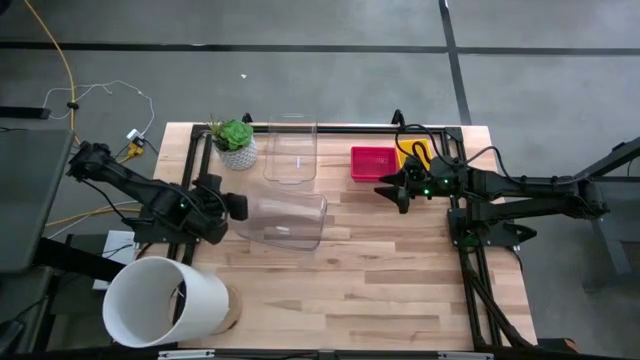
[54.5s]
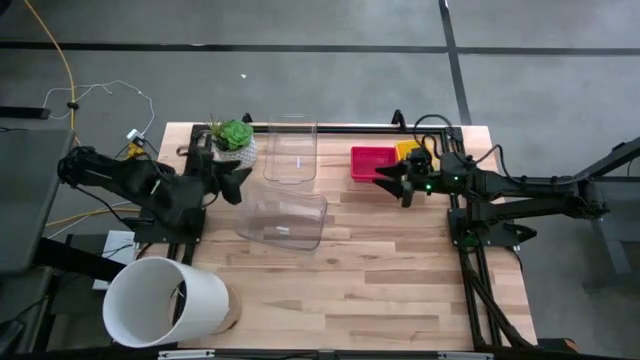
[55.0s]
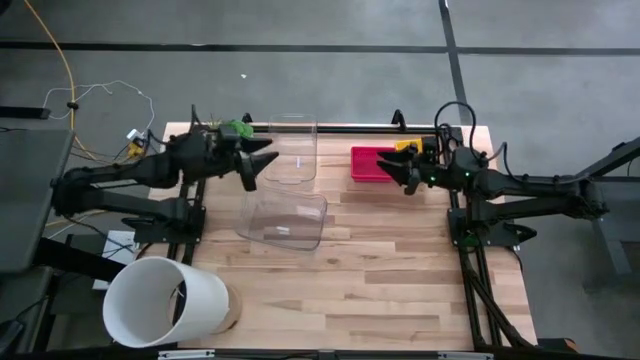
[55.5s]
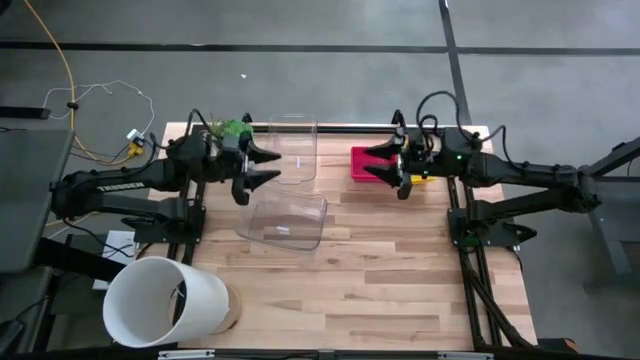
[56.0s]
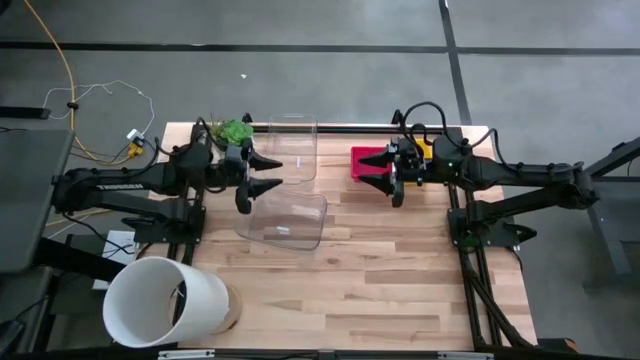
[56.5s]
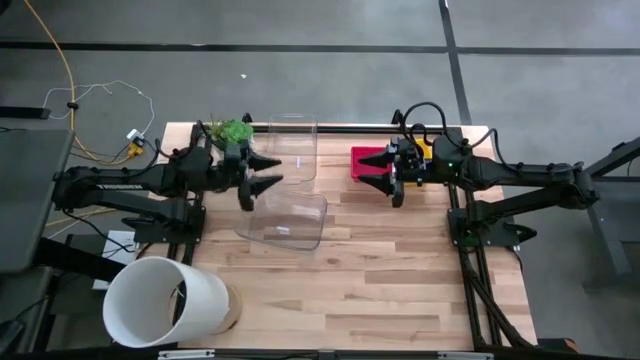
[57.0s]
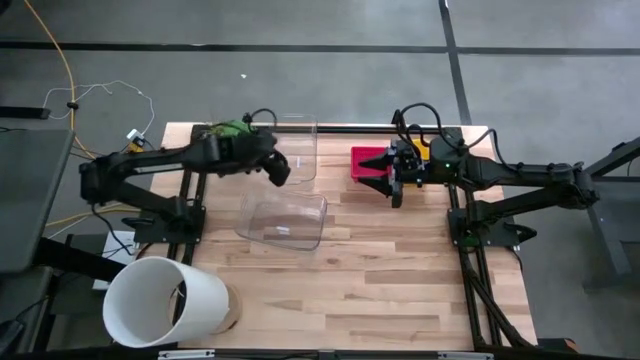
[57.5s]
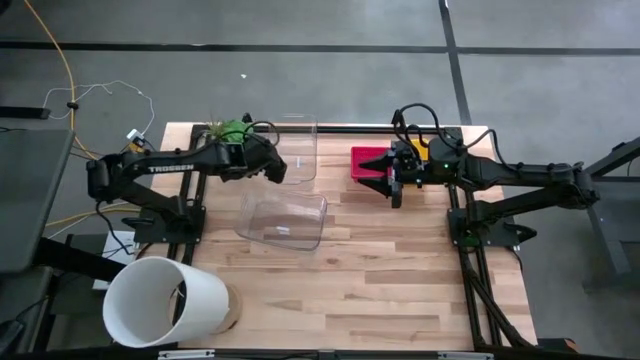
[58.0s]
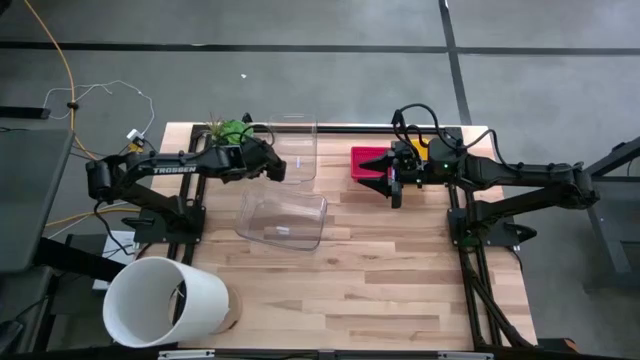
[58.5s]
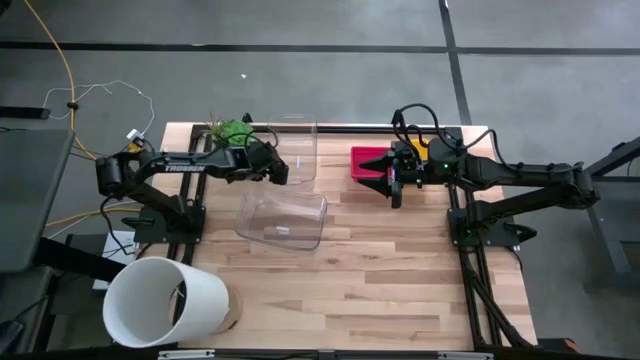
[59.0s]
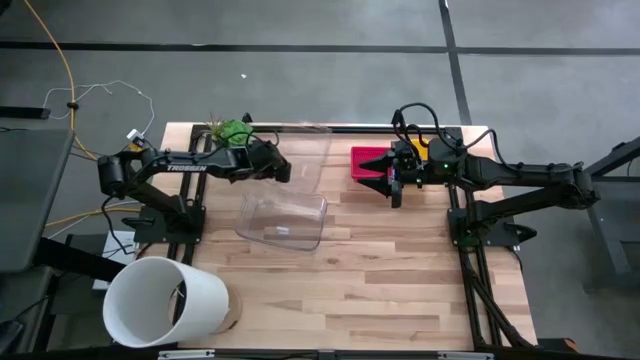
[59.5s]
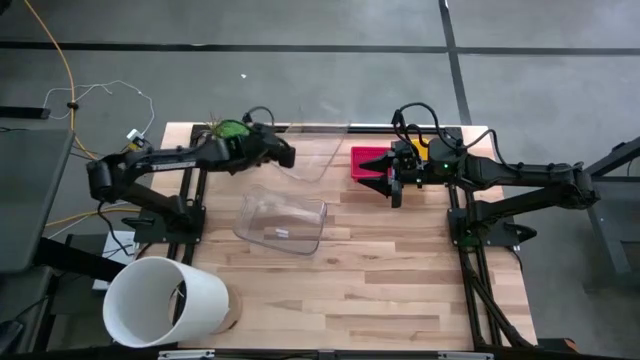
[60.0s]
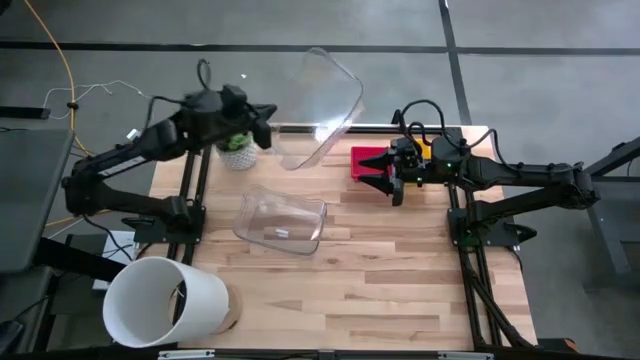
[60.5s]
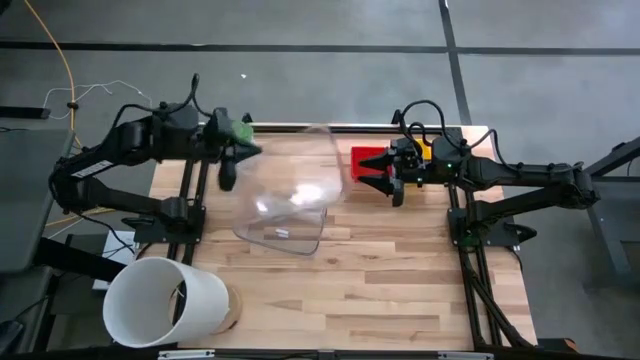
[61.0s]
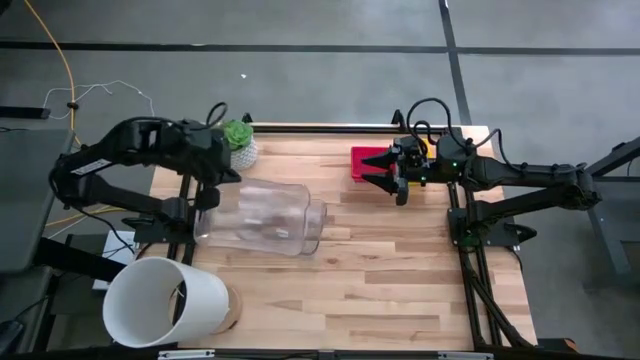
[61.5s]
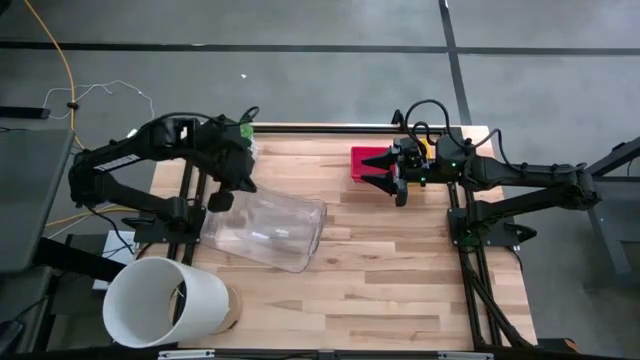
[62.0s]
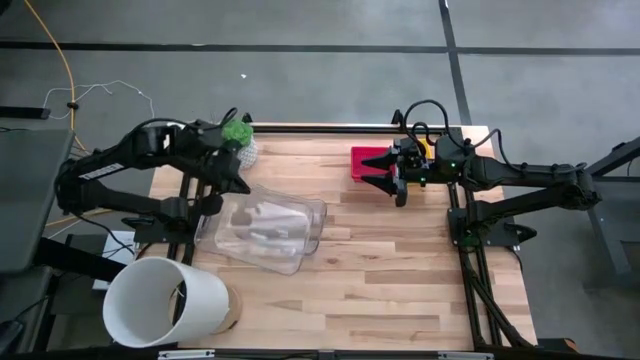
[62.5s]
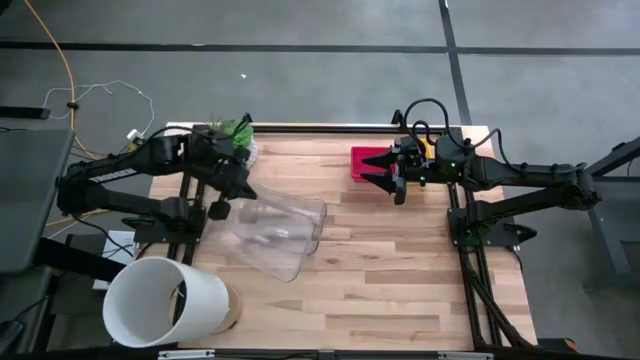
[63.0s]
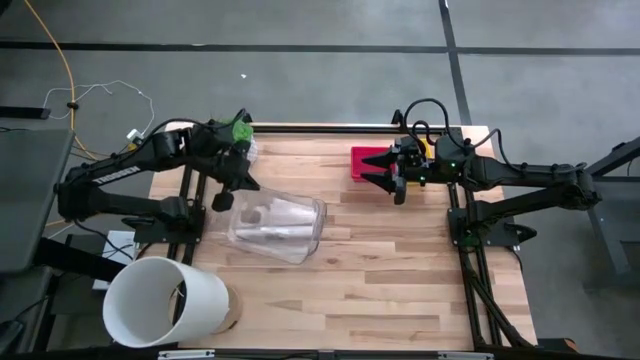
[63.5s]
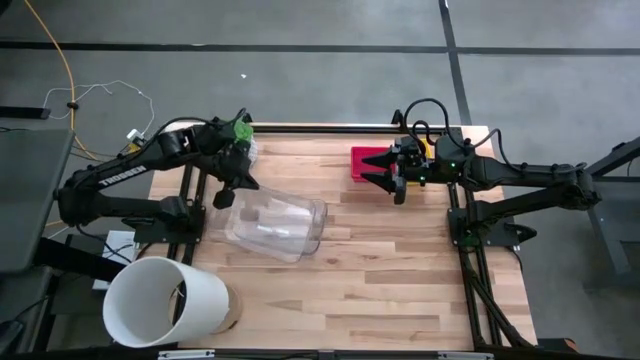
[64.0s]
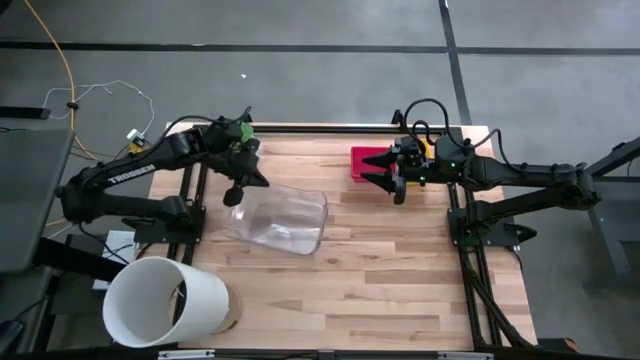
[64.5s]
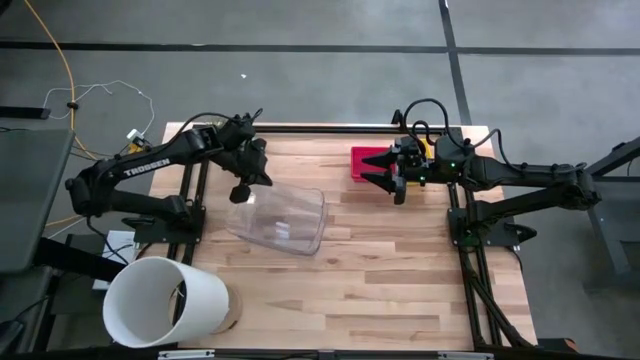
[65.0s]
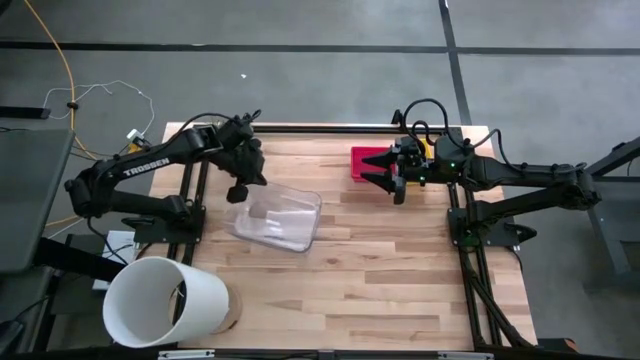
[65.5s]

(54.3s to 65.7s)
Stack the top transparent bin on top of the bottom transparent bin

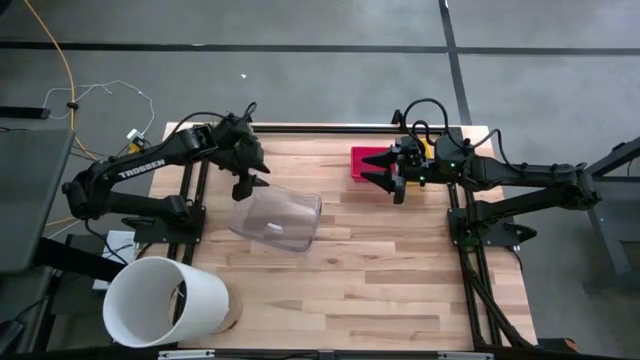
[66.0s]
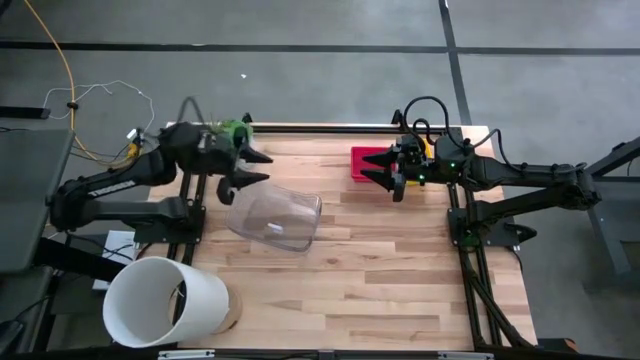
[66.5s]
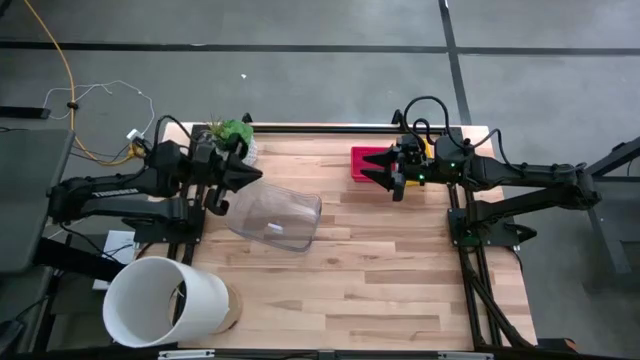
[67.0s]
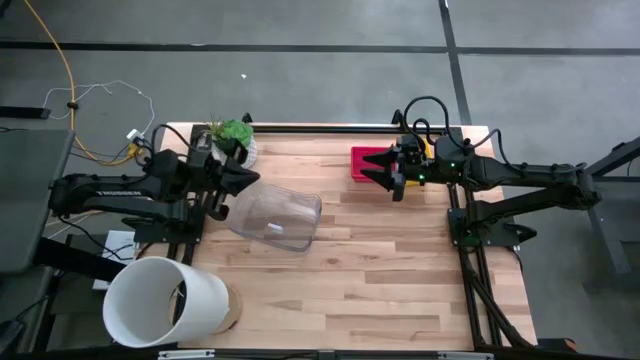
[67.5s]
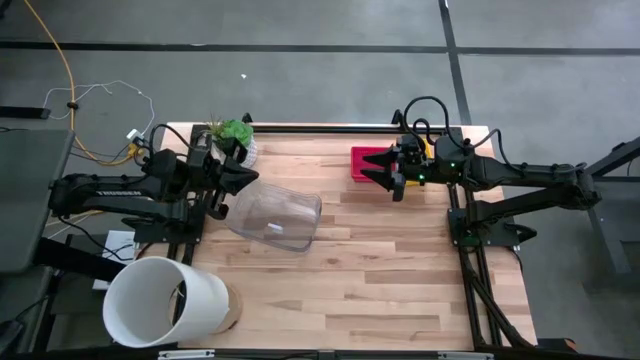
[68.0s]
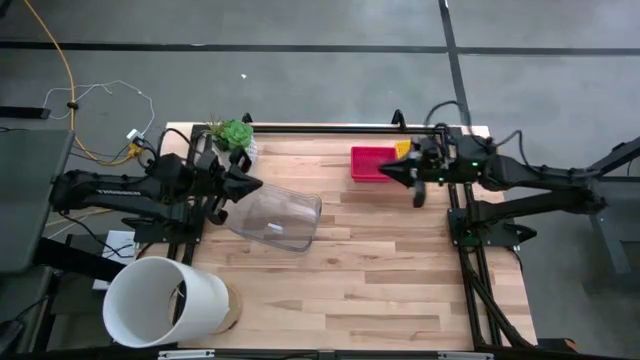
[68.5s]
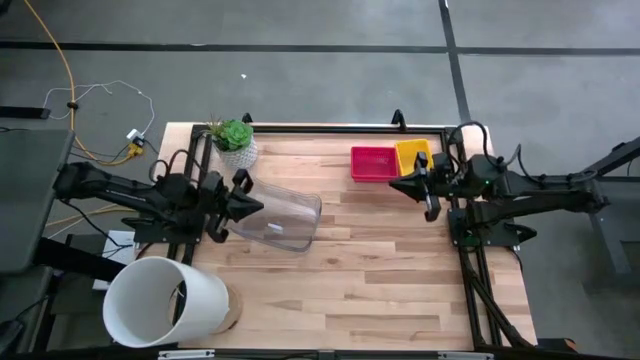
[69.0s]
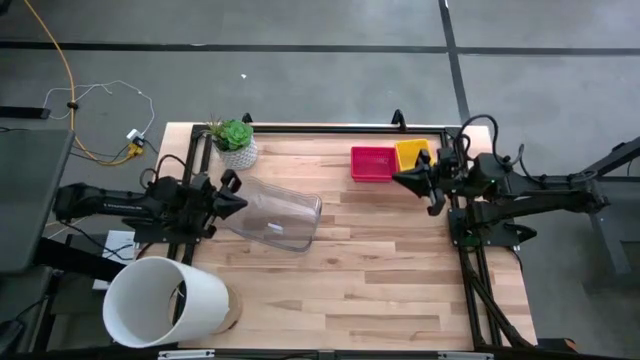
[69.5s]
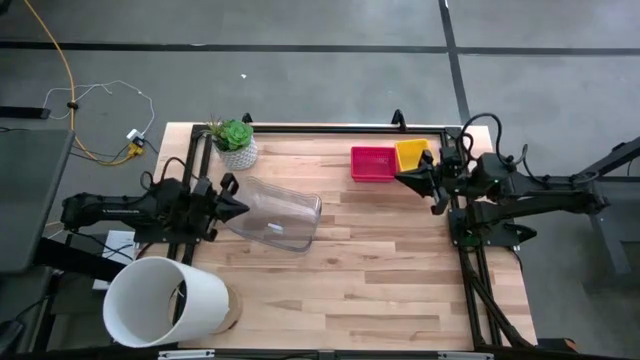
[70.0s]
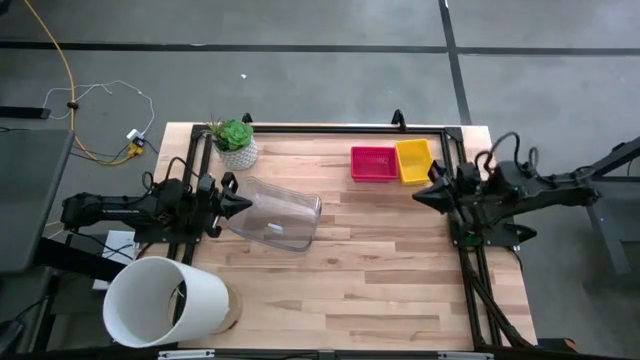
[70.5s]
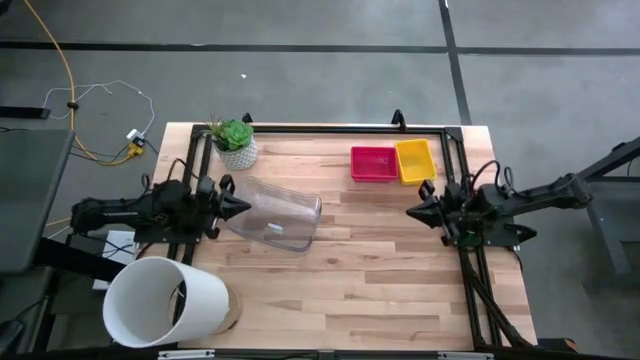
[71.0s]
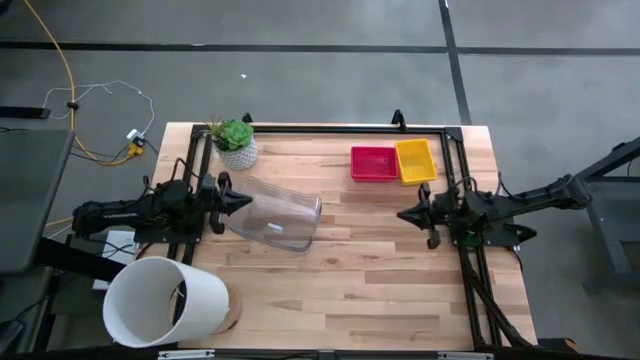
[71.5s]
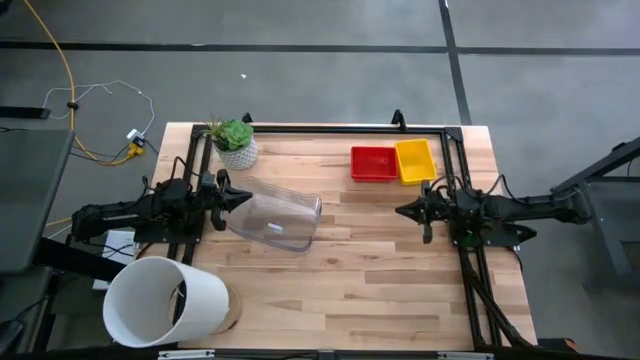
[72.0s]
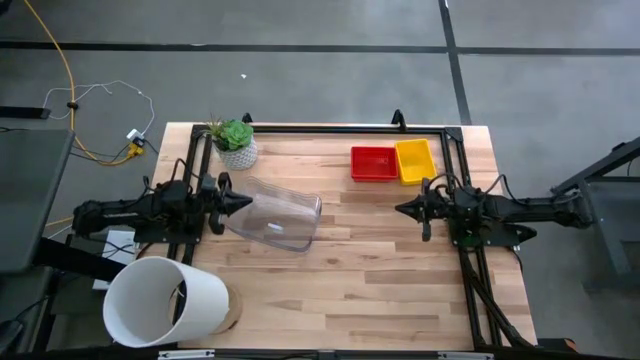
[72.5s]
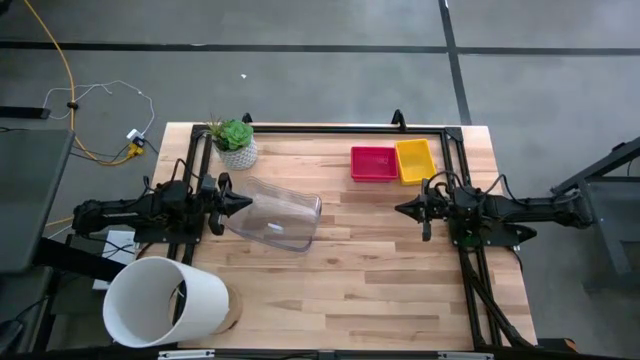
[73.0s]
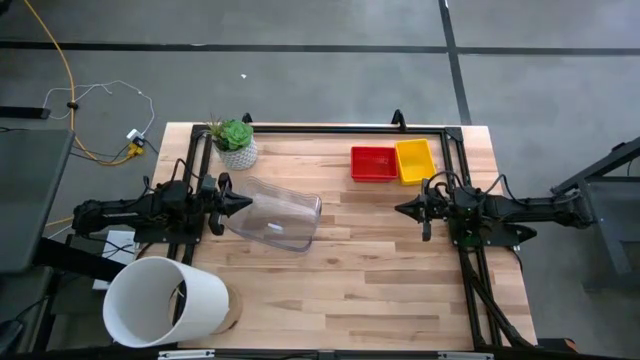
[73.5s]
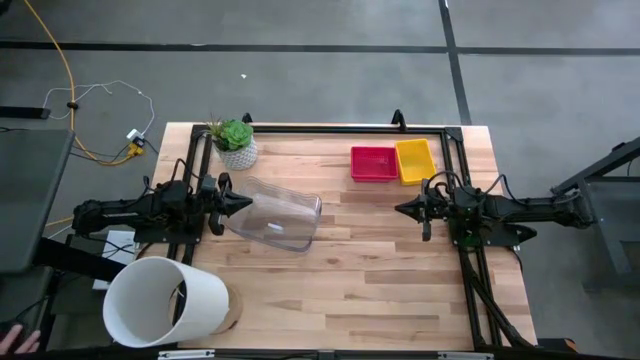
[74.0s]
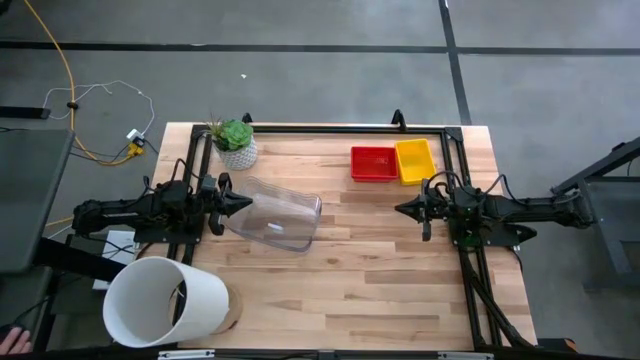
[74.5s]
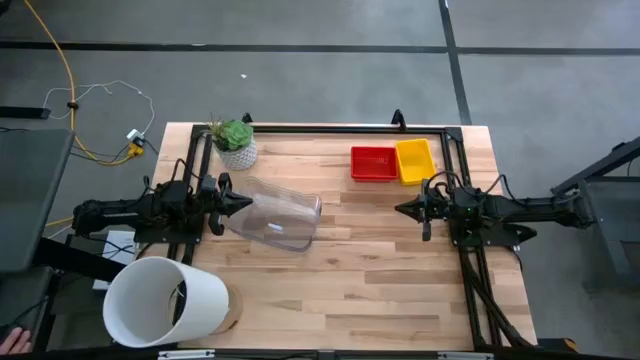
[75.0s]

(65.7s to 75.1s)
Return to Home Position
